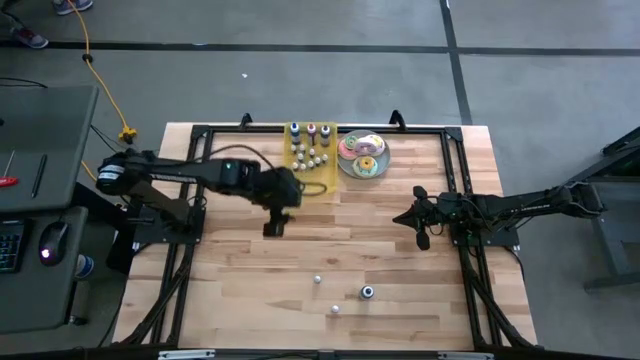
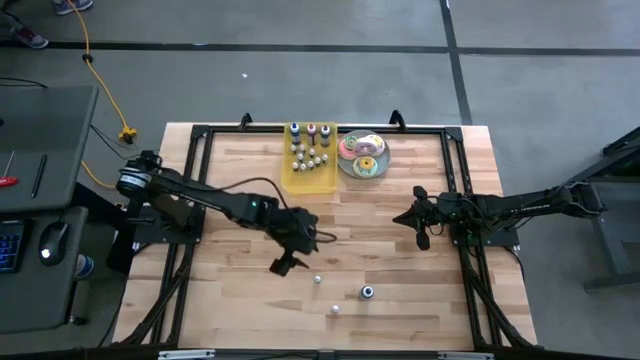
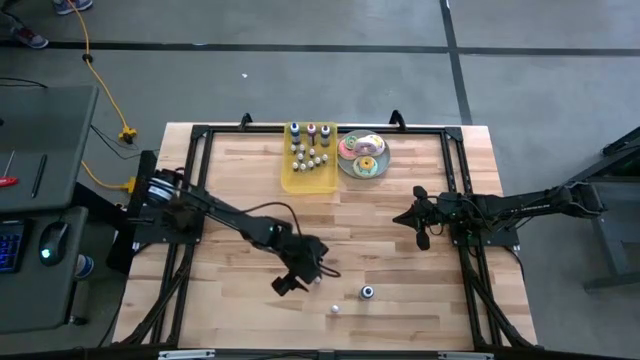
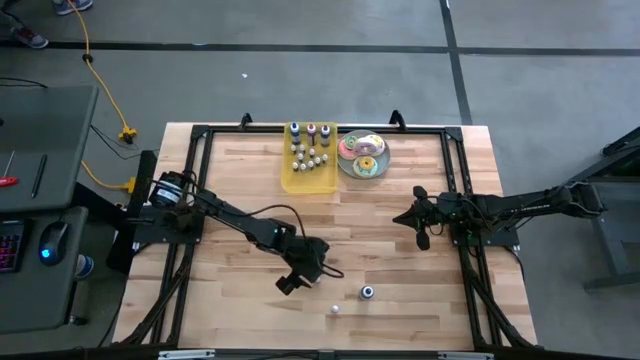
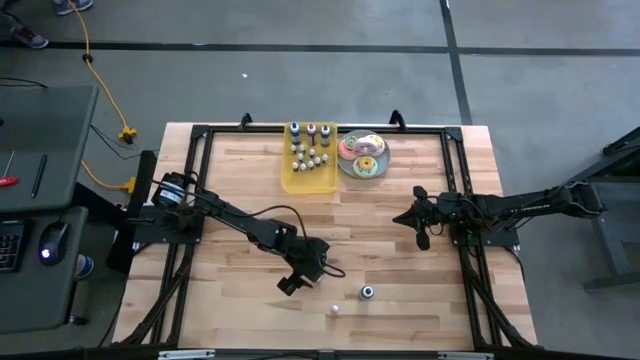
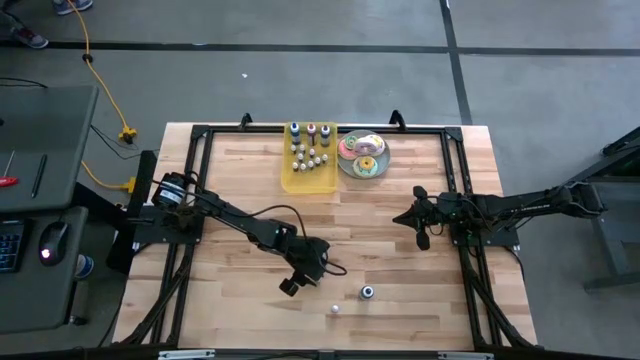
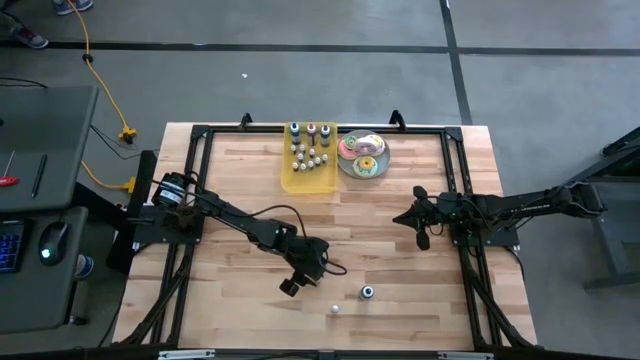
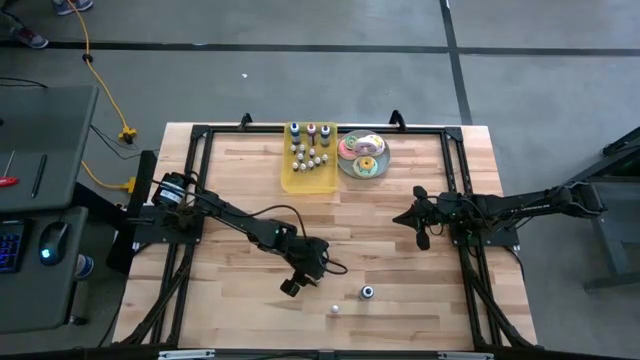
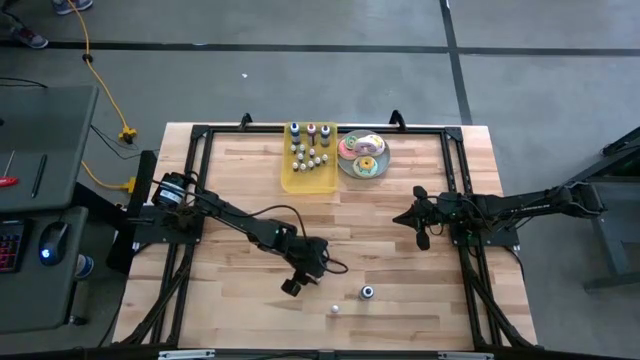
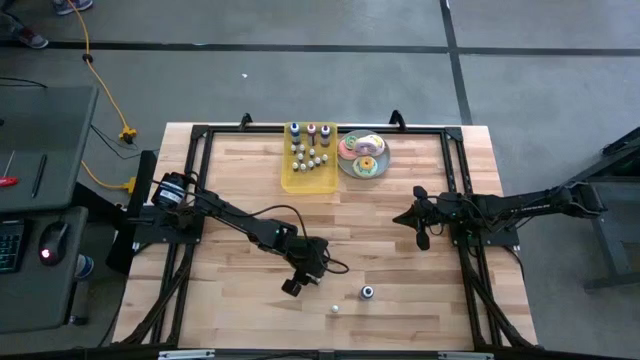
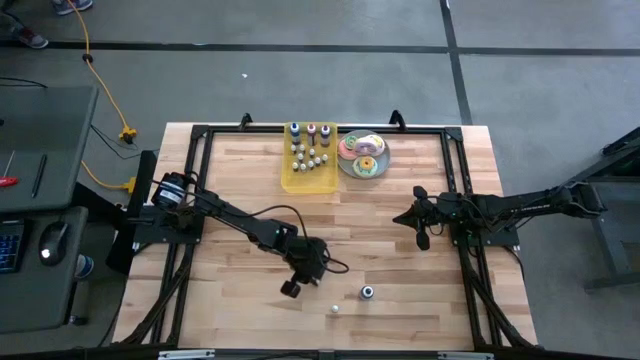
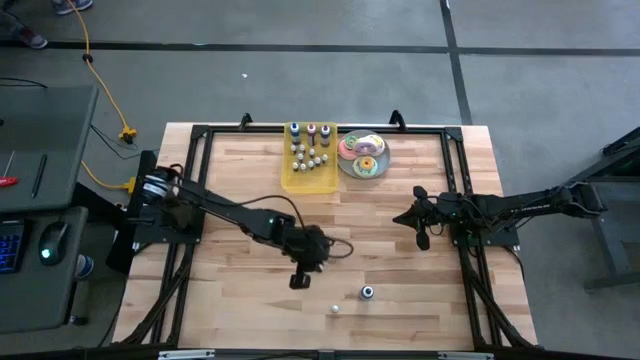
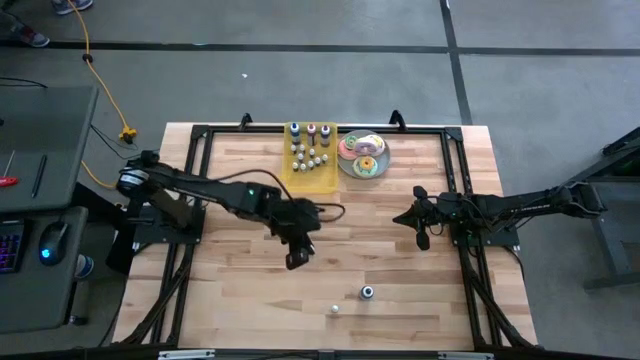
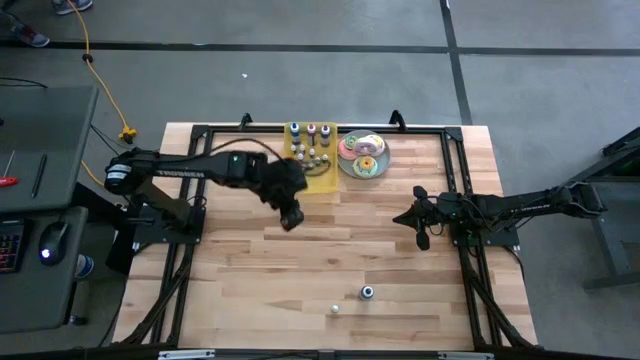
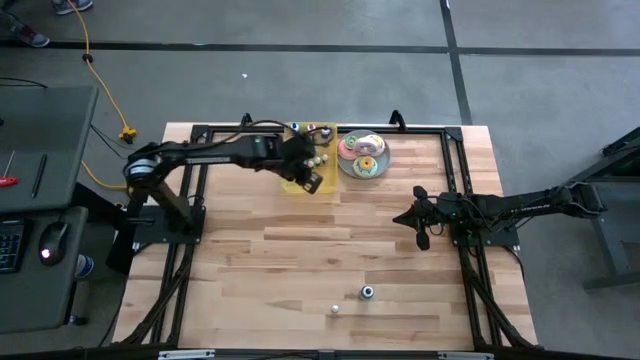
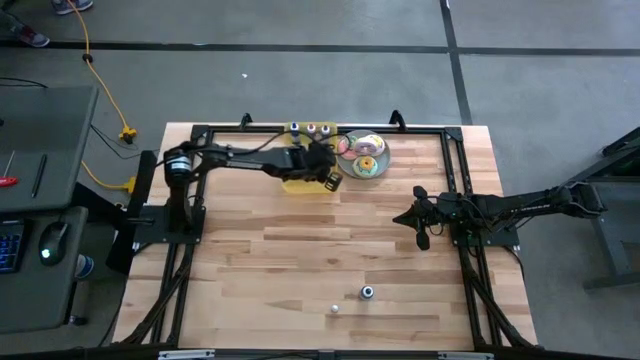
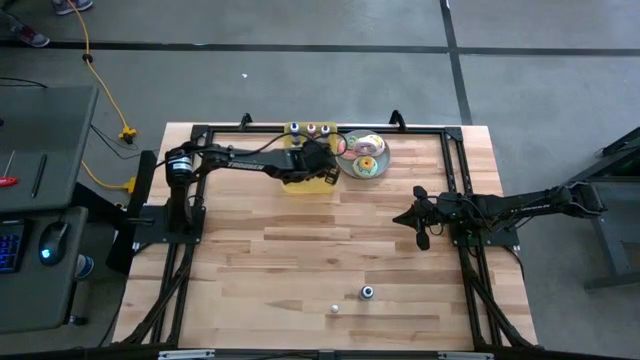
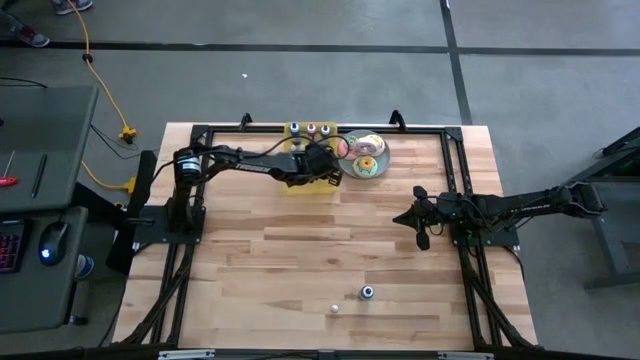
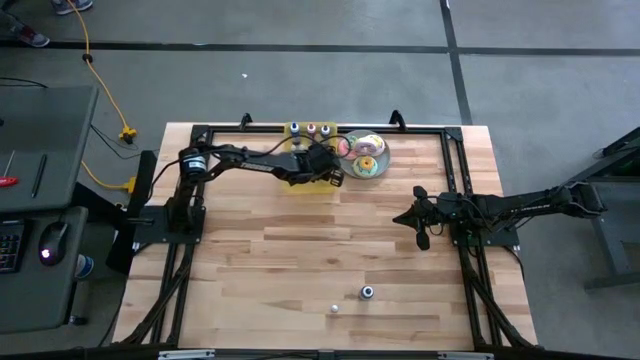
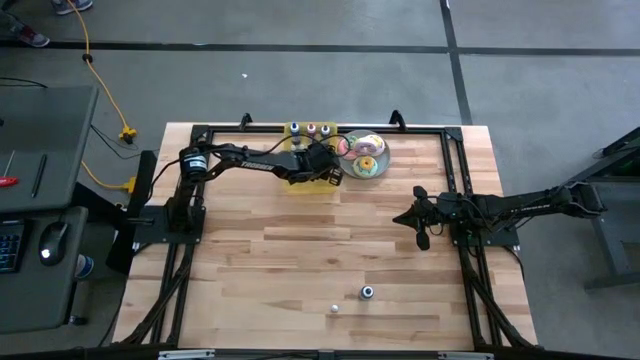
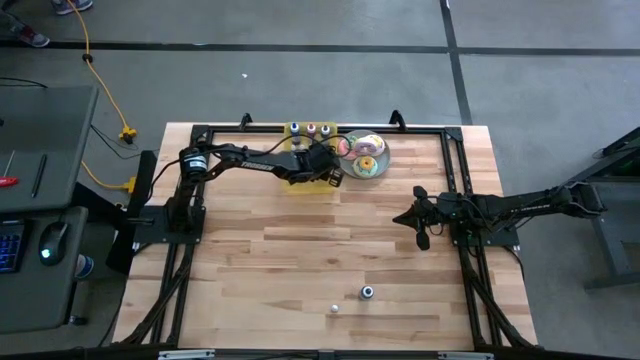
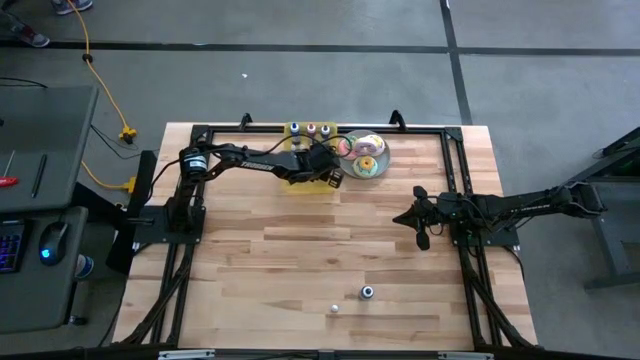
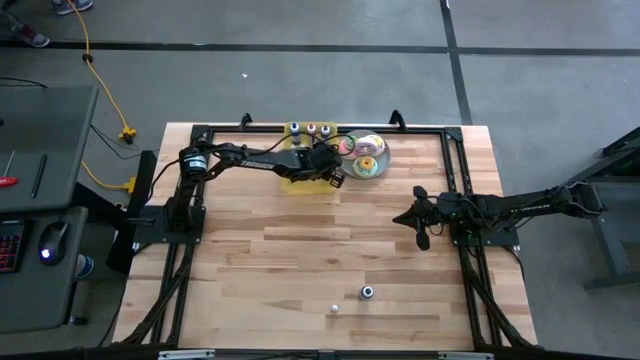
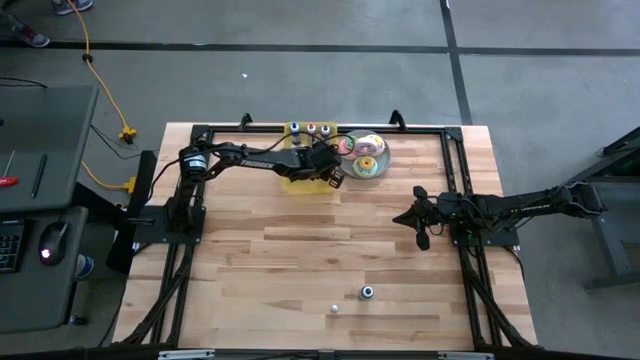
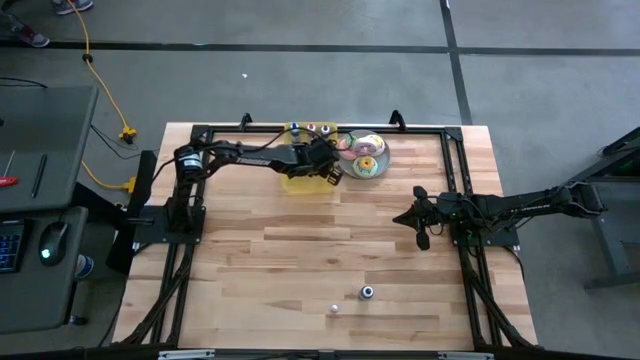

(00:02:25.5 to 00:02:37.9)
Task: Pick & Place food coloring
Put the small orange food coloring bottle into the bin

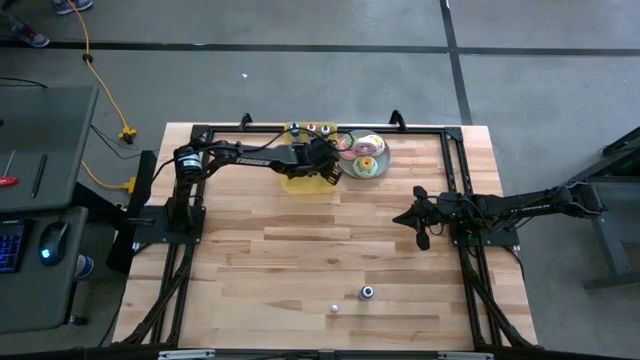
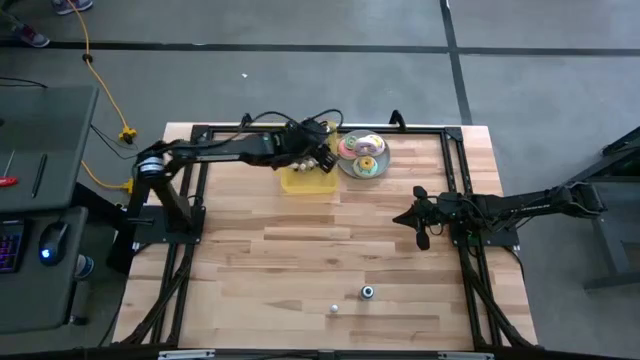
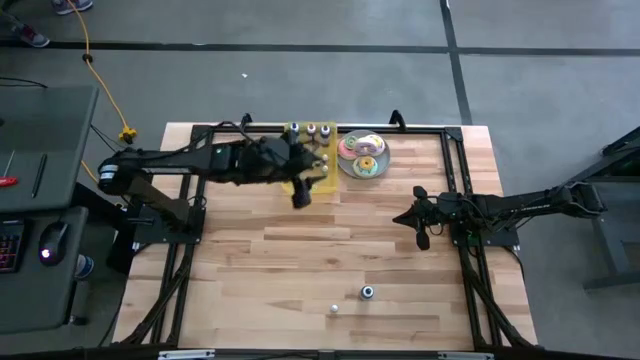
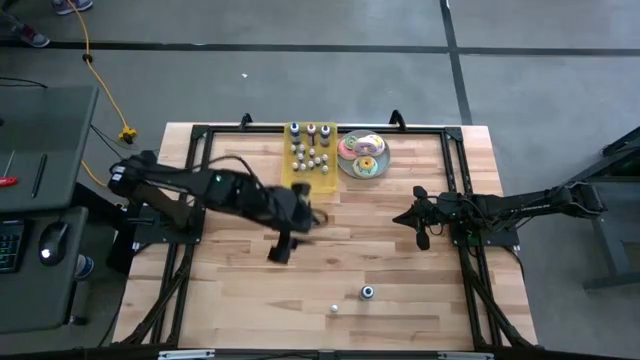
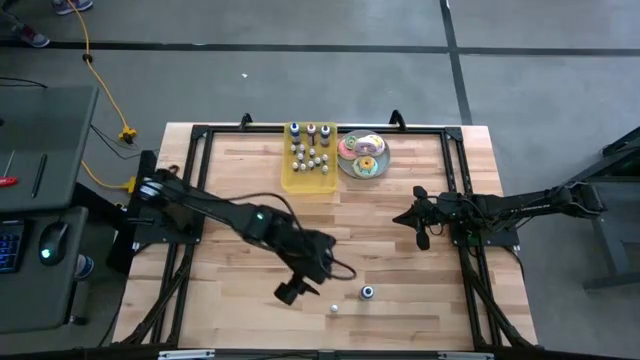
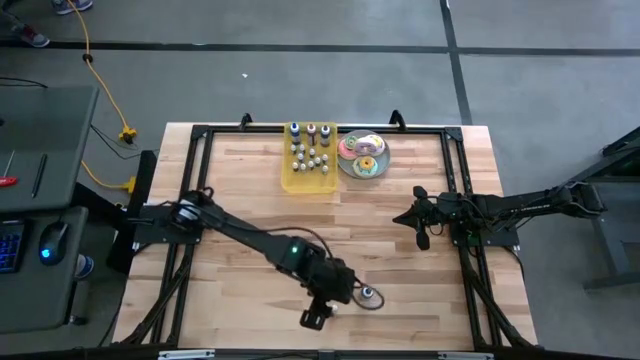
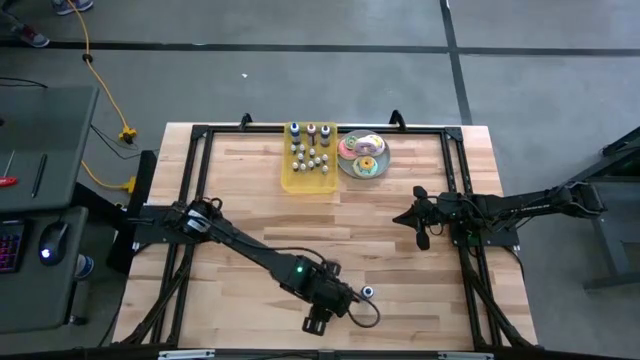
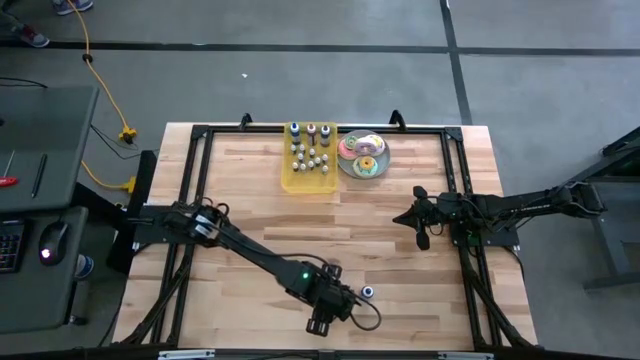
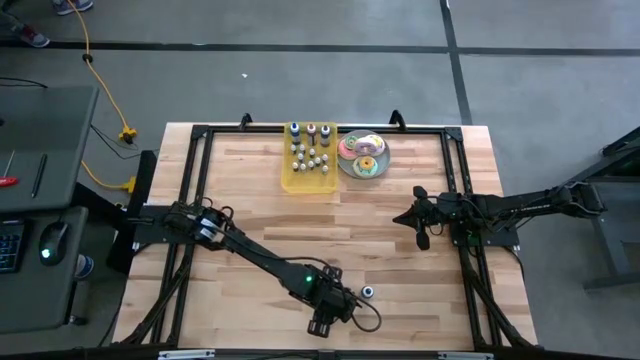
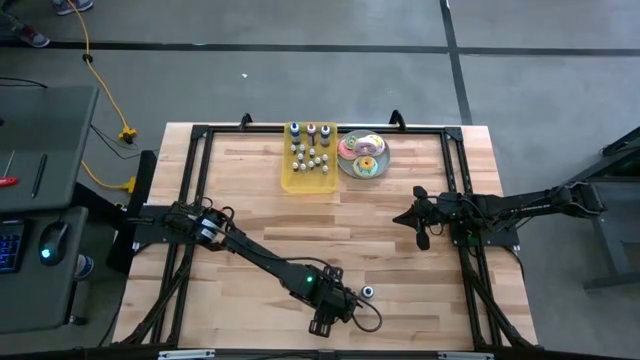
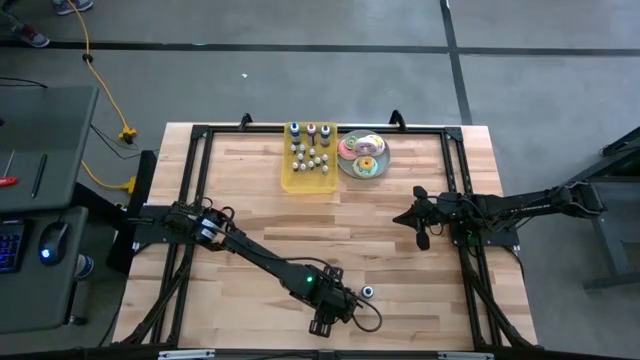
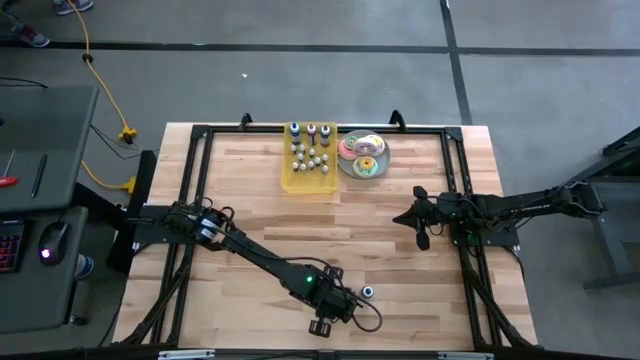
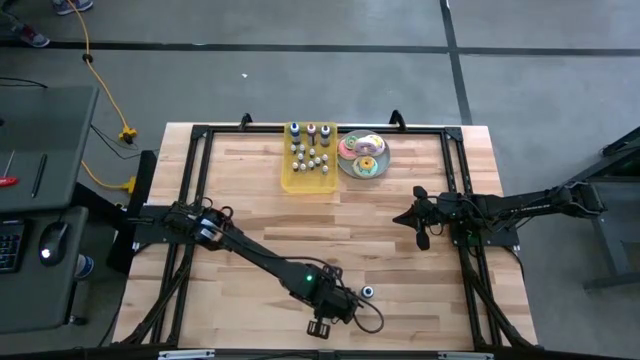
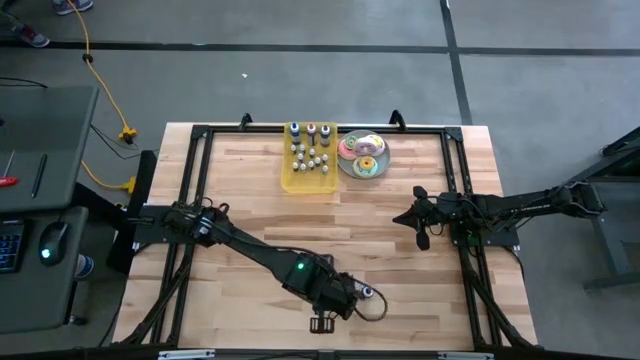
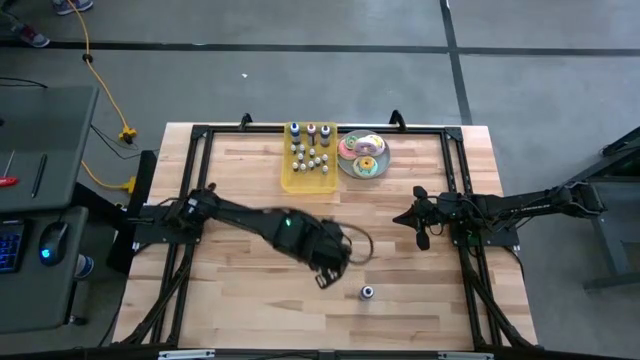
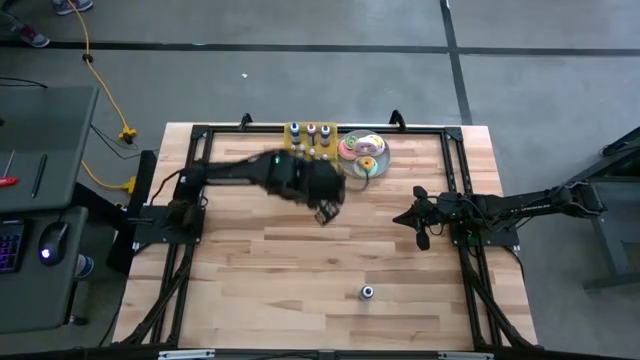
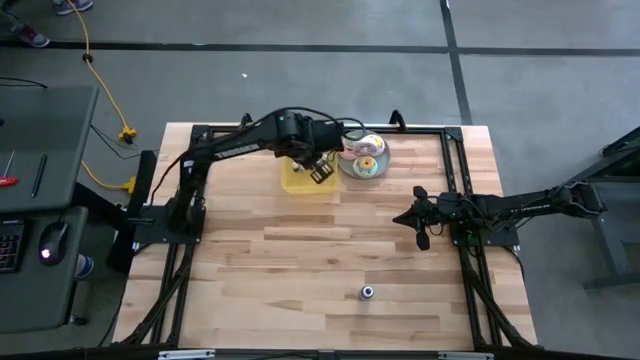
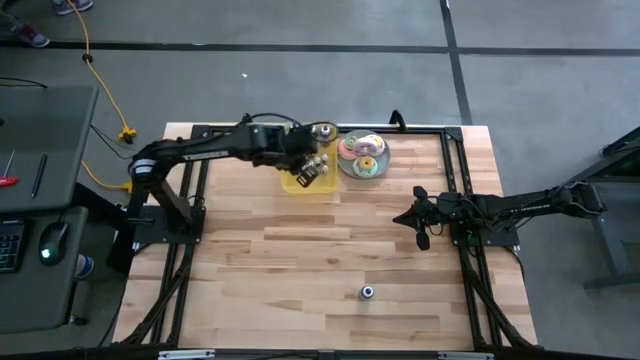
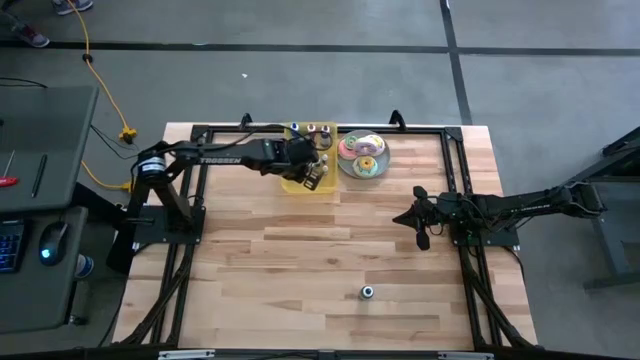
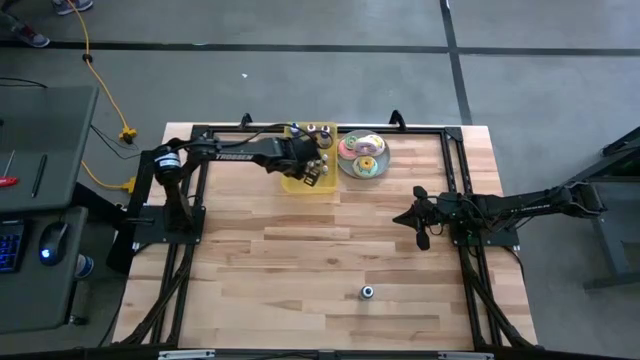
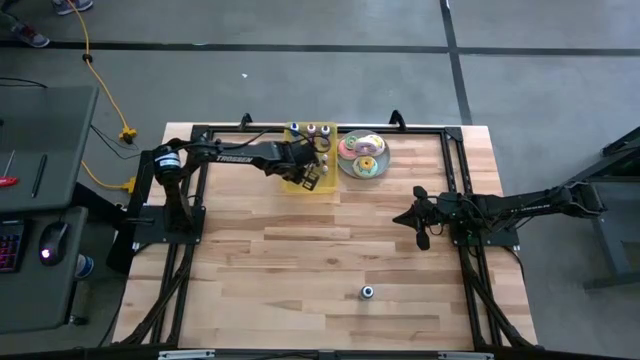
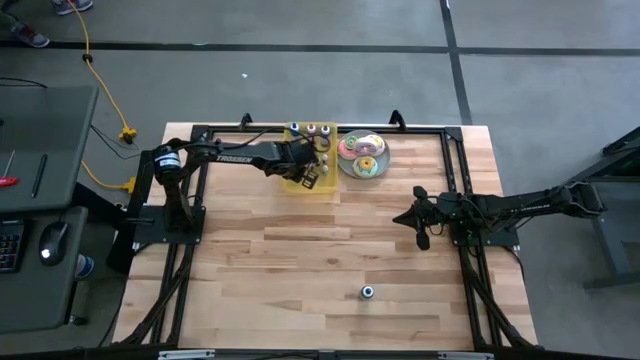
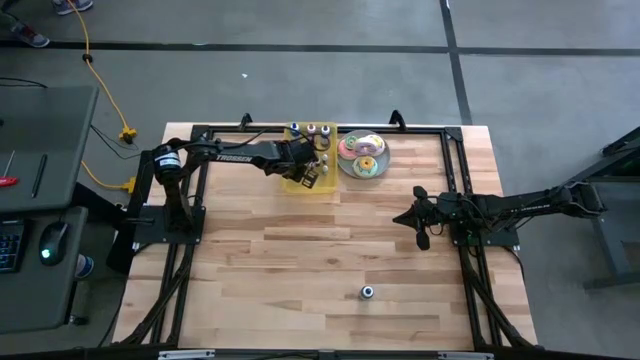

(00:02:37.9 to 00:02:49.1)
Put the small blue food coloring bottle into the bin
